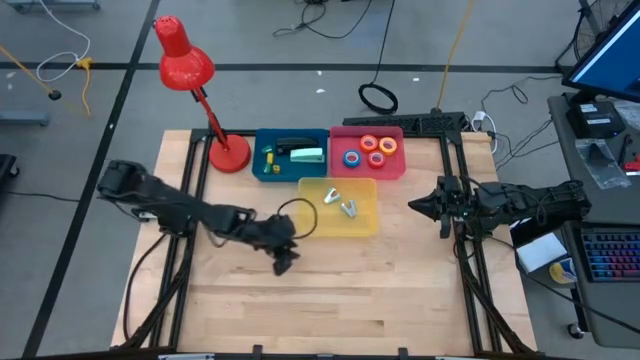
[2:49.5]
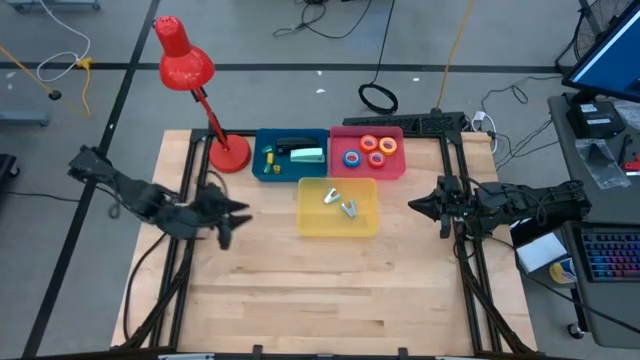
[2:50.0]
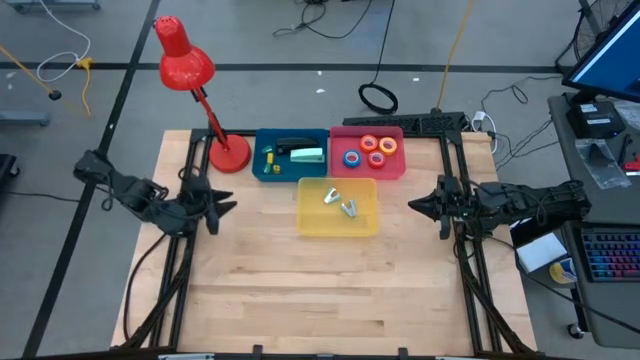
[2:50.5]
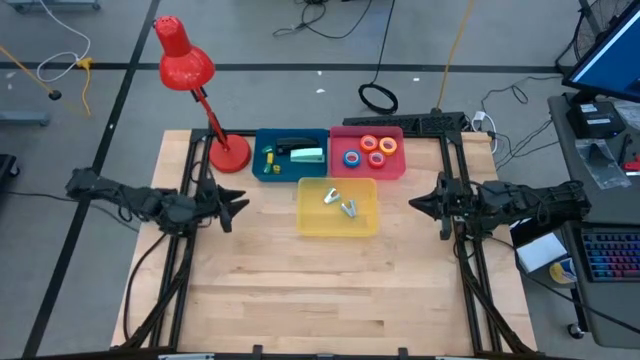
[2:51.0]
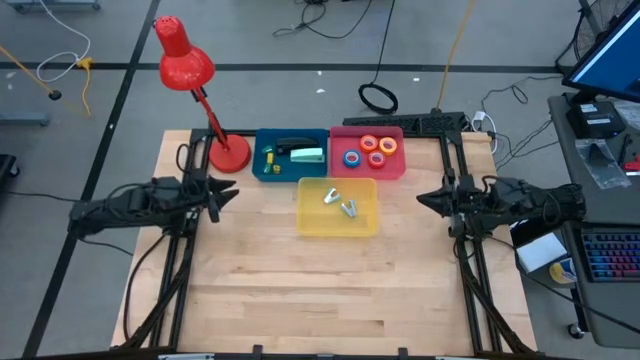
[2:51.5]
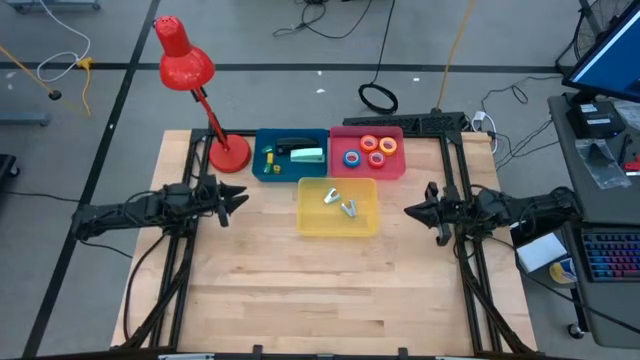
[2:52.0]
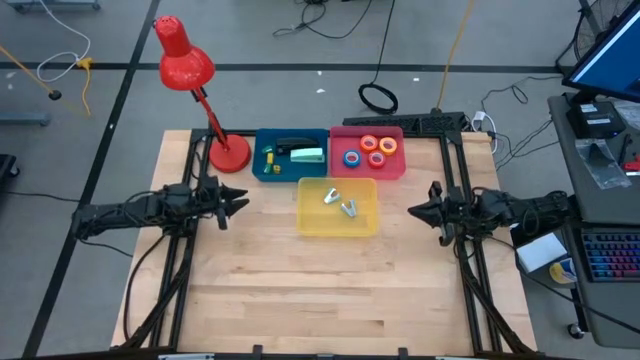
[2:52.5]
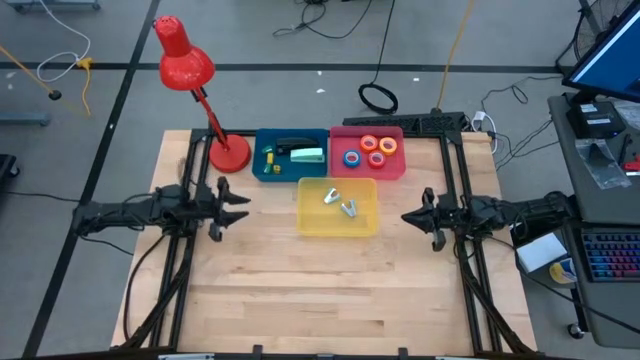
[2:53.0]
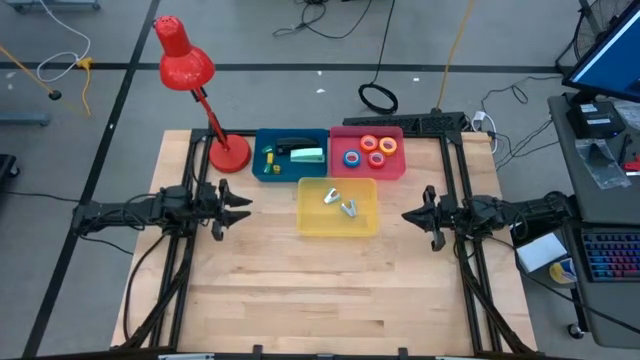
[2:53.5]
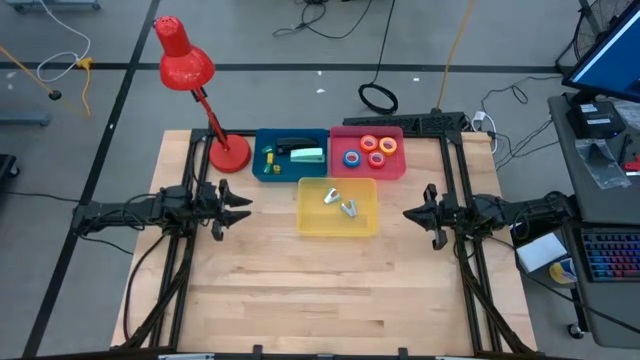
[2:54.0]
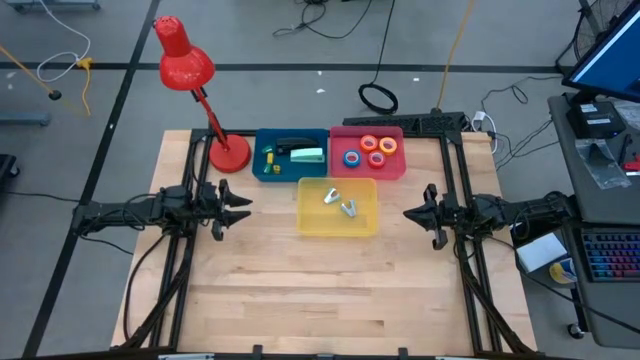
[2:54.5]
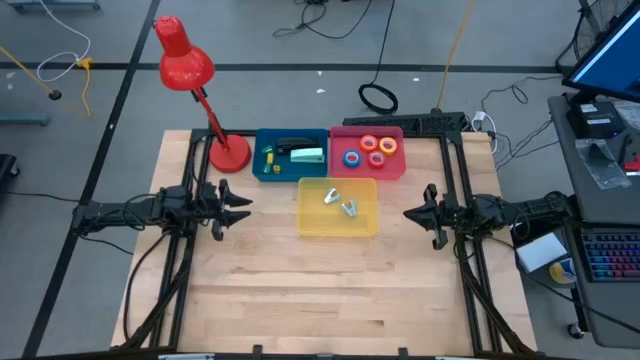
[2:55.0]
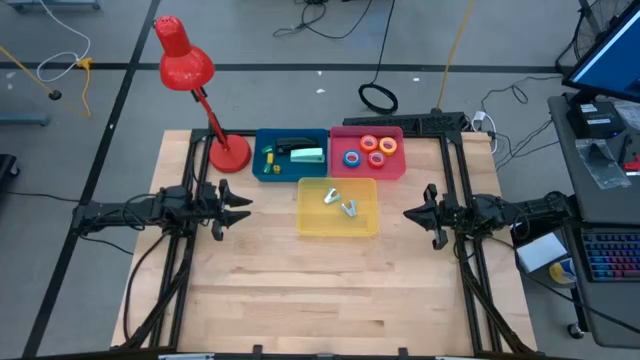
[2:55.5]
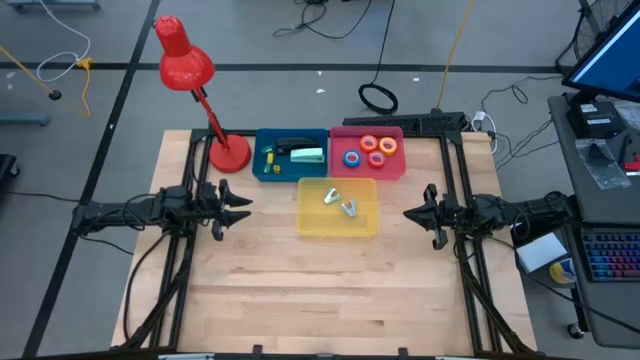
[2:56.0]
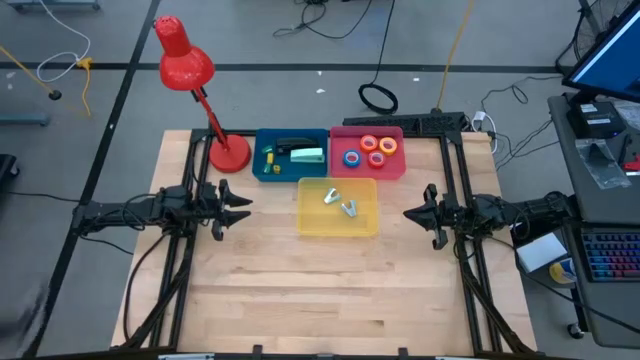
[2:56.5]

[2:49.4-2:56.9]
Task: Pick and place Stapler, Stapler remover, tape
Return to Home Position

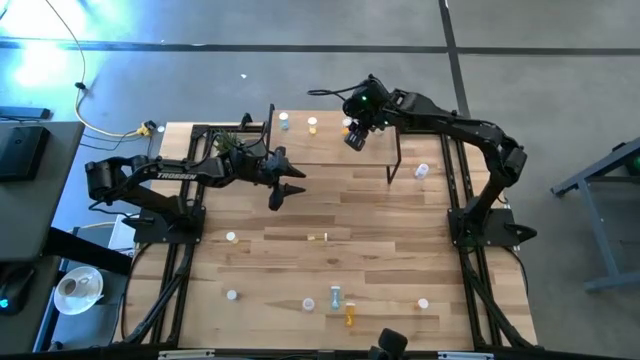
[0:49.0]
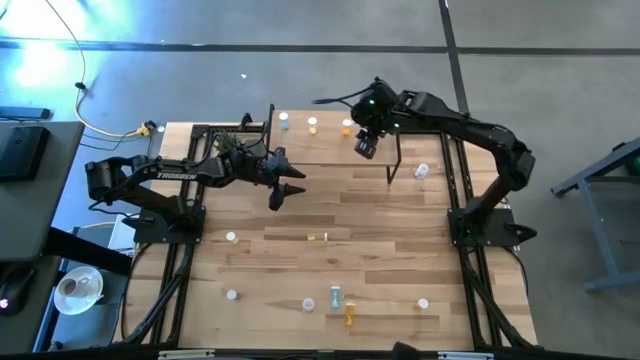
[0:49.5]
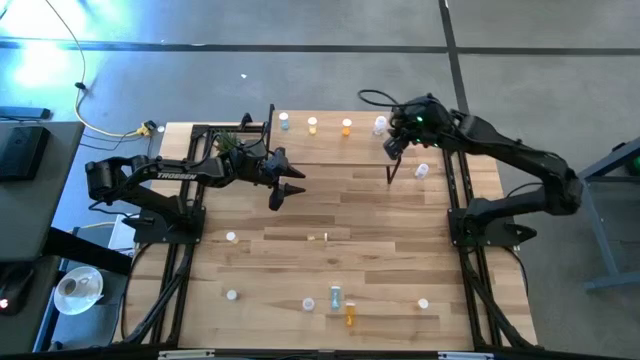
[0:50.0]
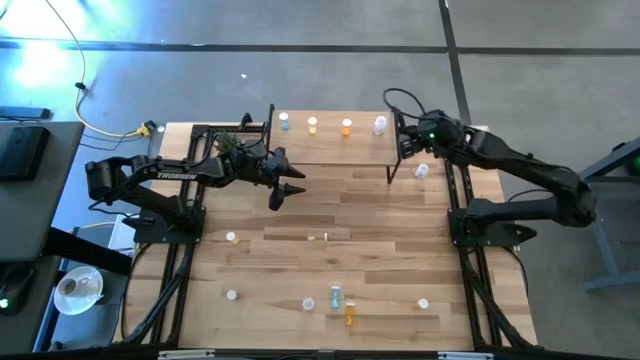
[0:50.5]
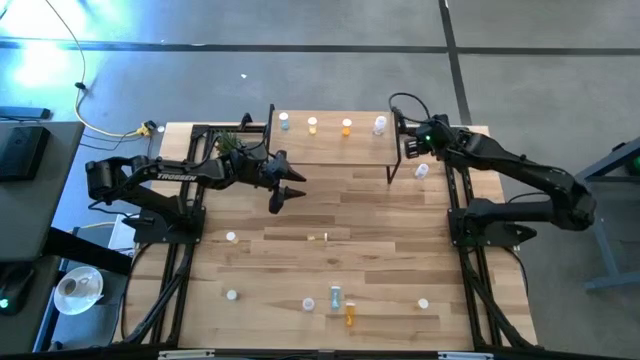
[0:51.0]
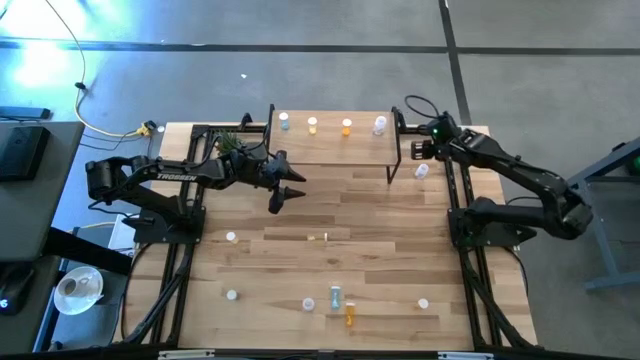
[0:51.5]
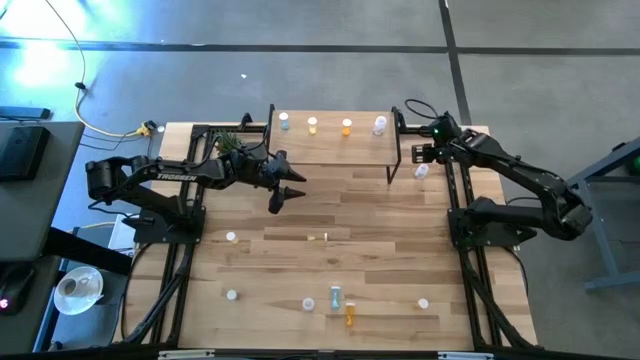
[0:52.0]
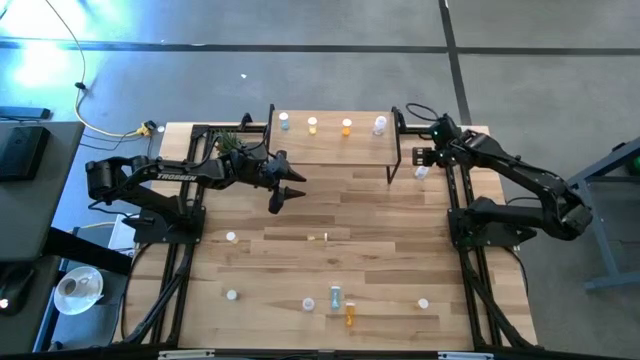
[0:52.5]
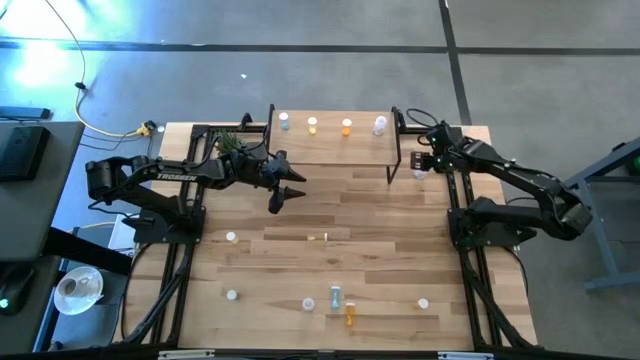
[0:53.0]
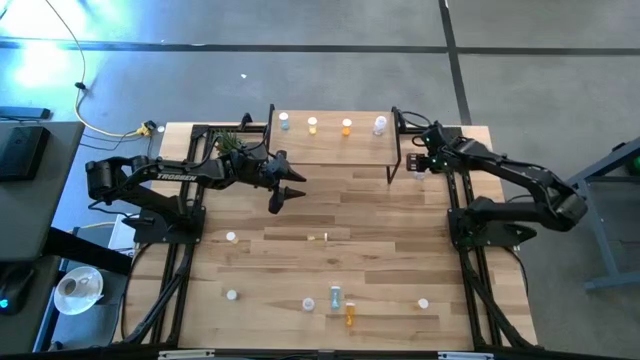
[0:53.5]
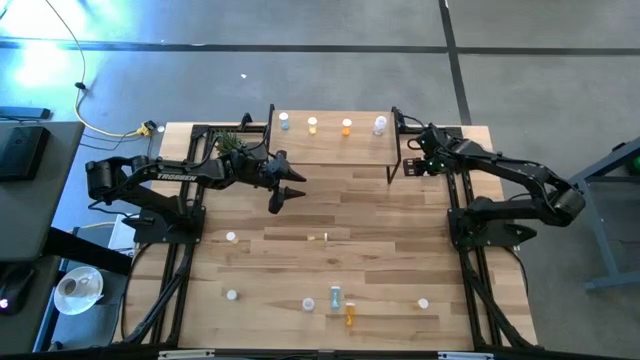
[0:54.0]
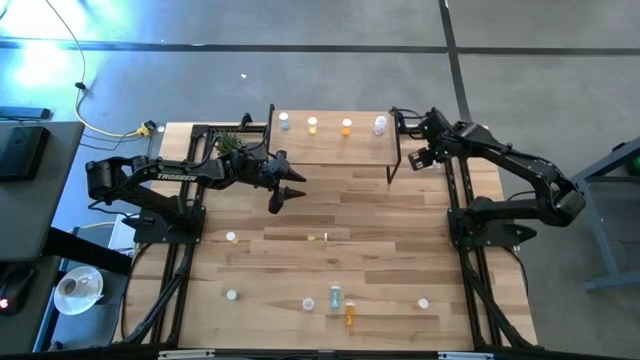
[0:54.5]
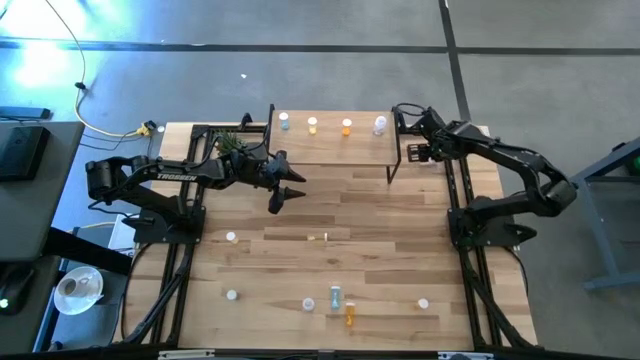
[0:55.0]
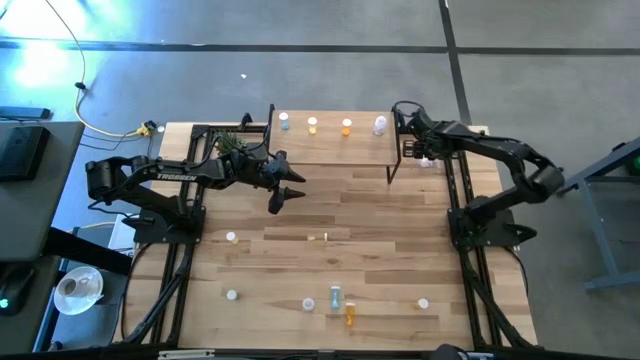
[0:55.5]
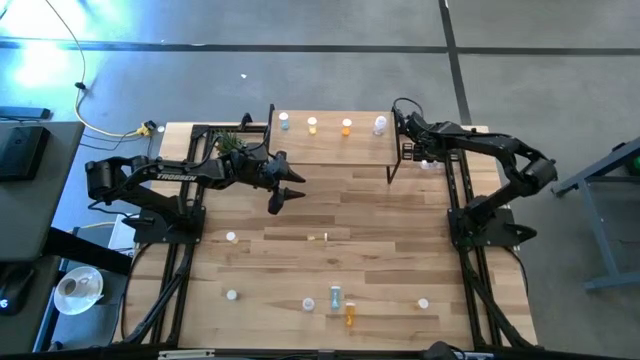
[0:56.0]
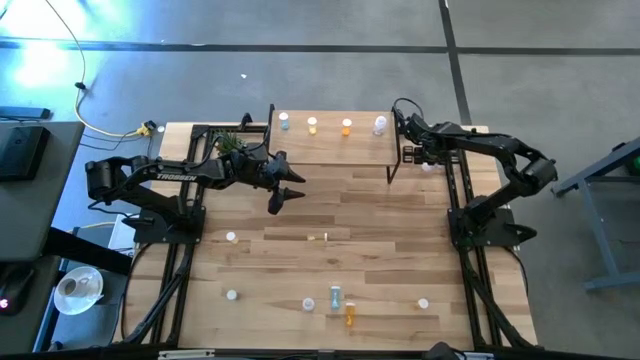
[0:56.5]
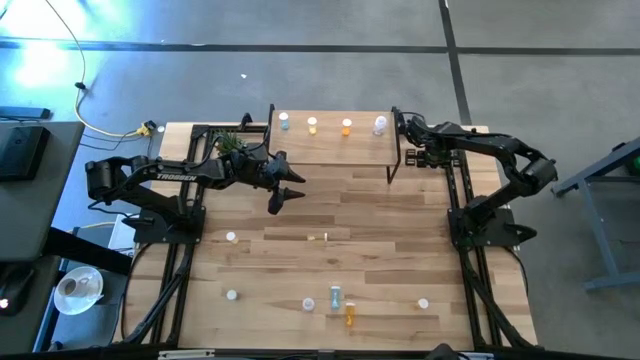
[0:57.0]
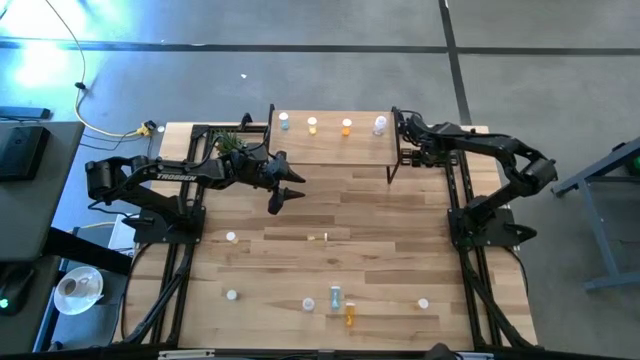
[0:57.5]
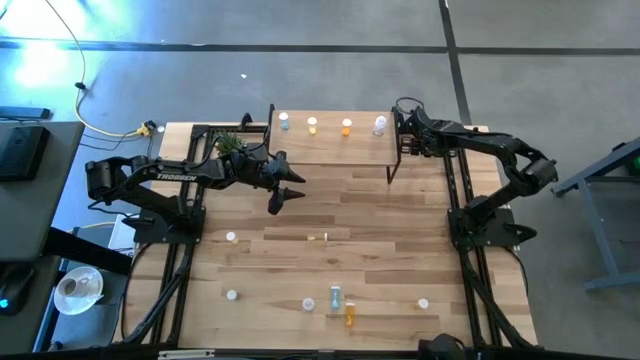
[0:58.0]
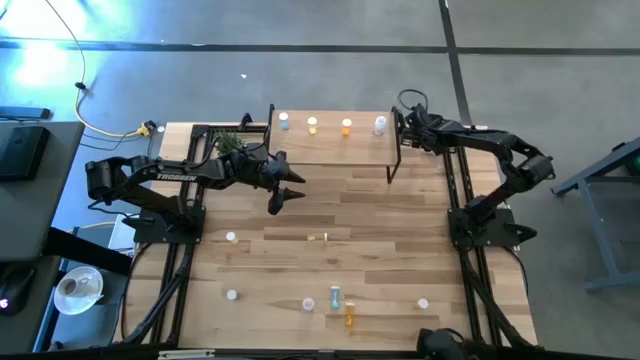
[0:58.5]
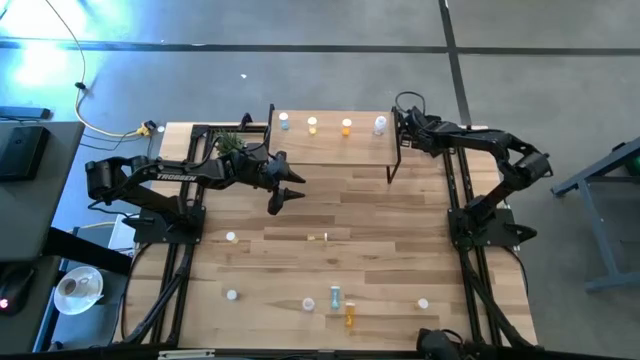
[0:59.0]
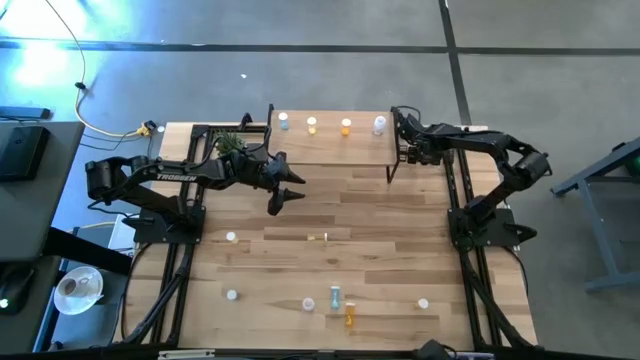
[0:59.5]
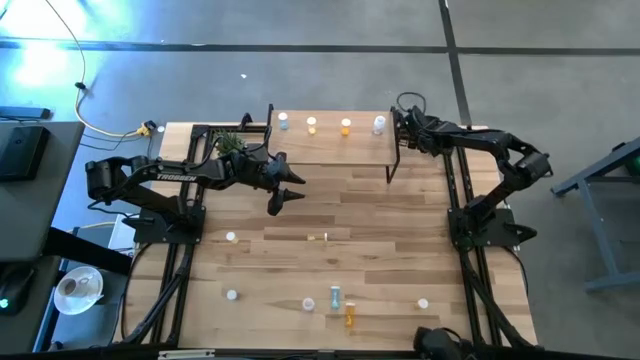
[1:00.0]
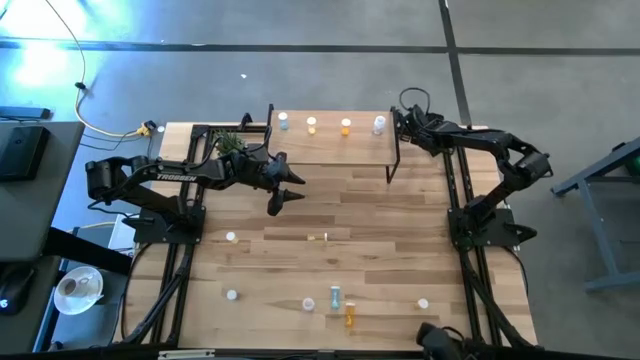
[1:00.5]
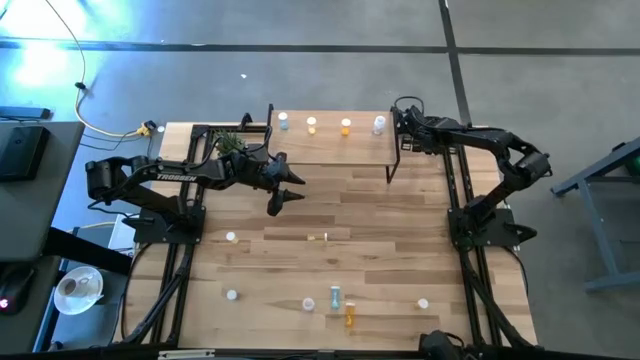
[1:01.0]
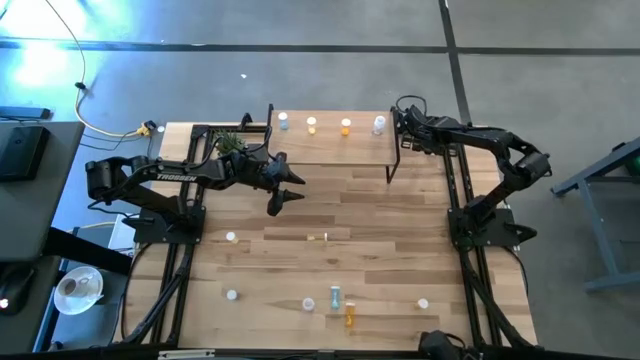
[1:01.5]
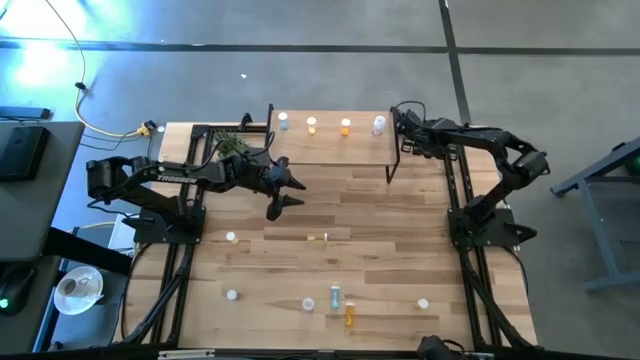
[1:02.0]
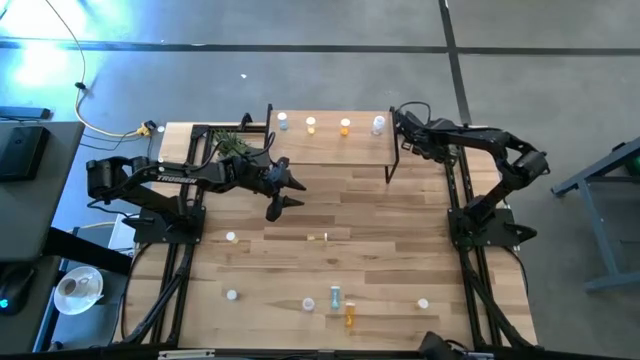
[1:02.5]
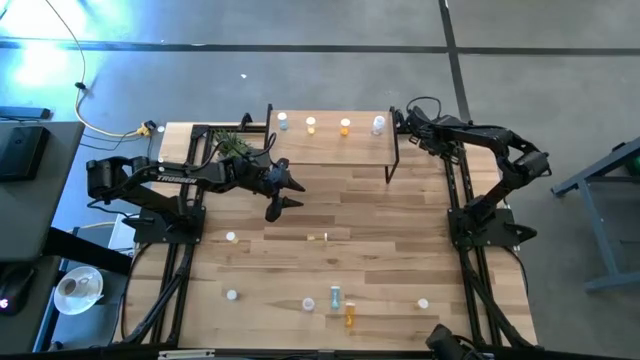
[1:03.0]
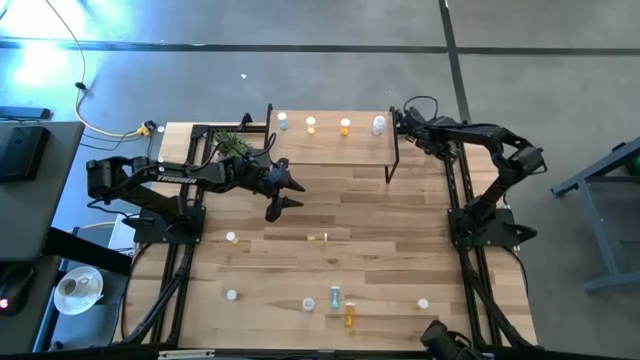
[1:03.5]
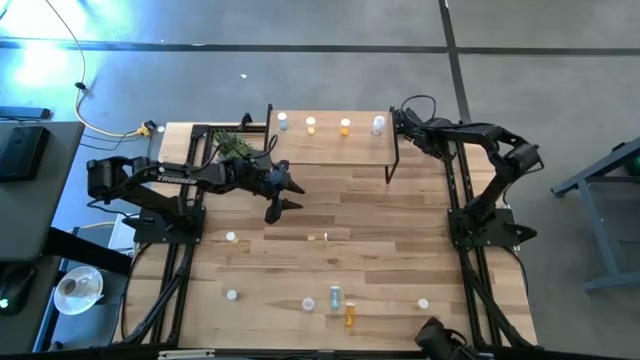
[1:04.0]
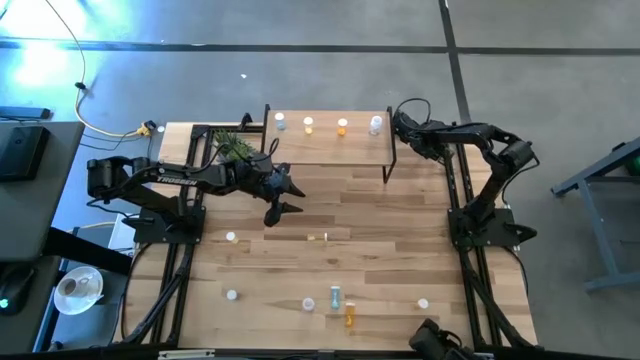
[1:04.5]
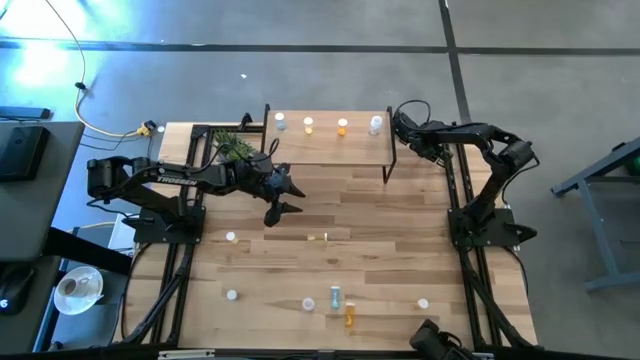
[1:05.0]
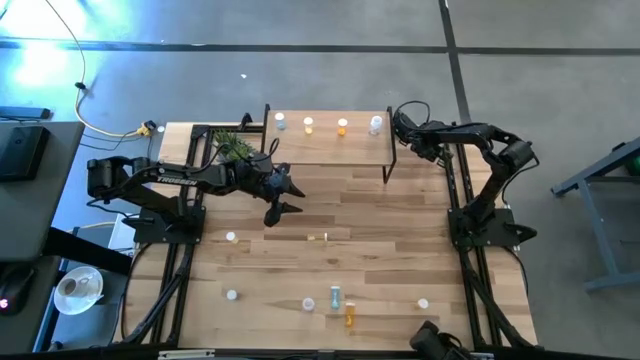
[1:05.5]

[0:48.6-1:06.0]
Task: Pick and place medicine bottles onto shelf by color
Put the top transparent pill bottle on the shelf aligned with the transparent pill bottle
